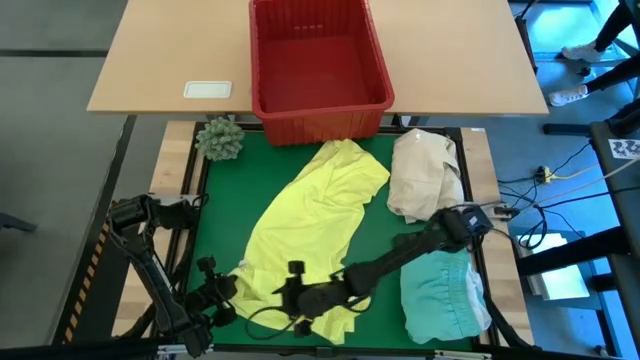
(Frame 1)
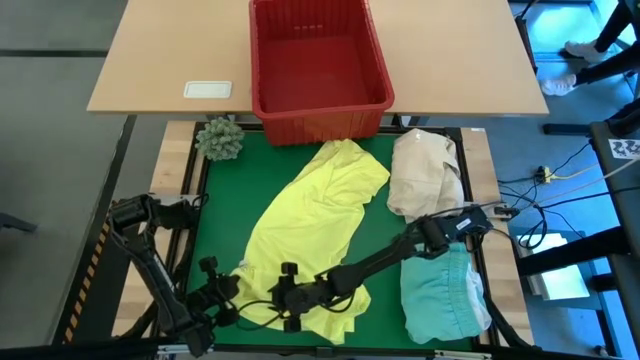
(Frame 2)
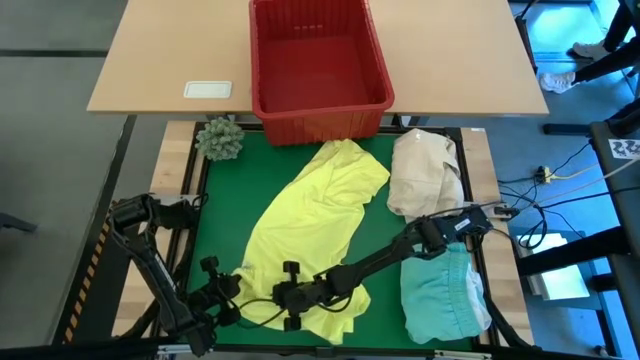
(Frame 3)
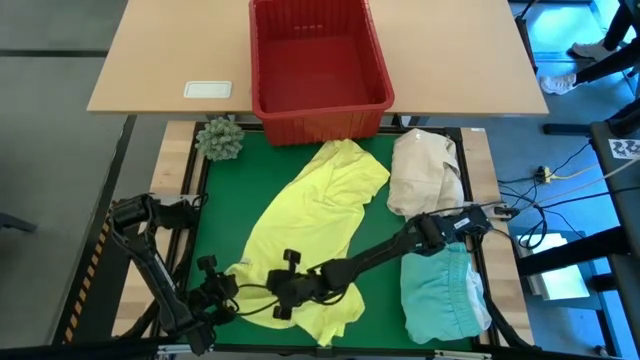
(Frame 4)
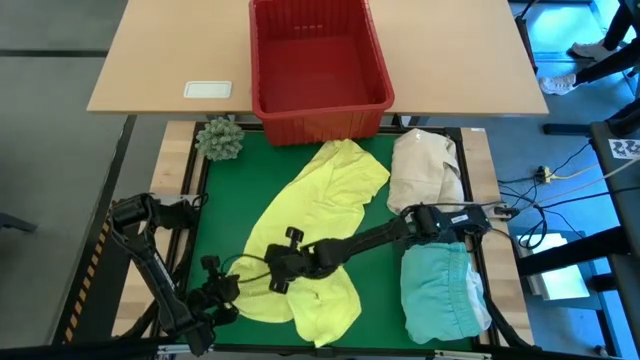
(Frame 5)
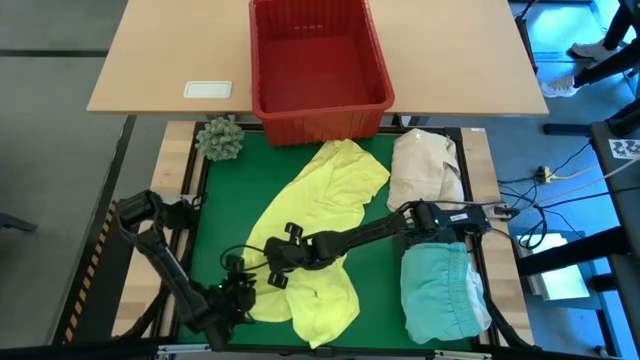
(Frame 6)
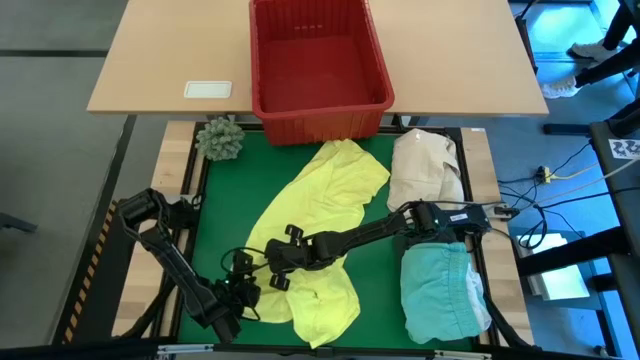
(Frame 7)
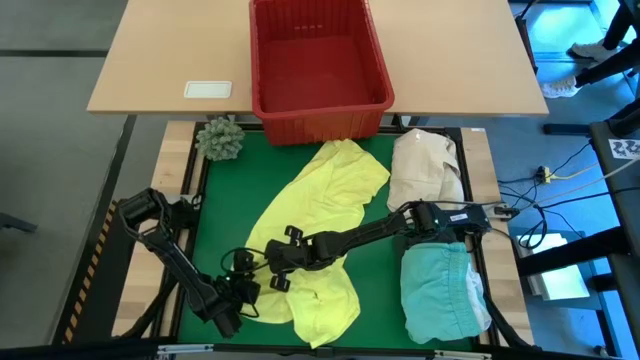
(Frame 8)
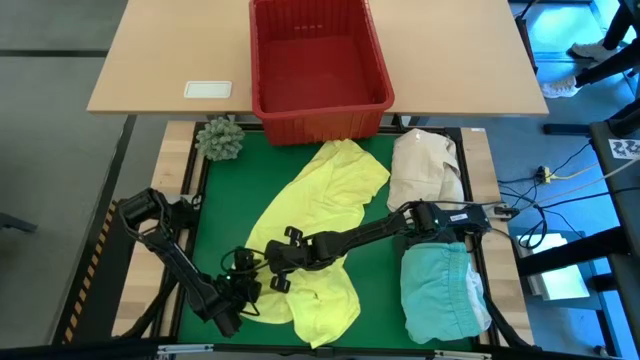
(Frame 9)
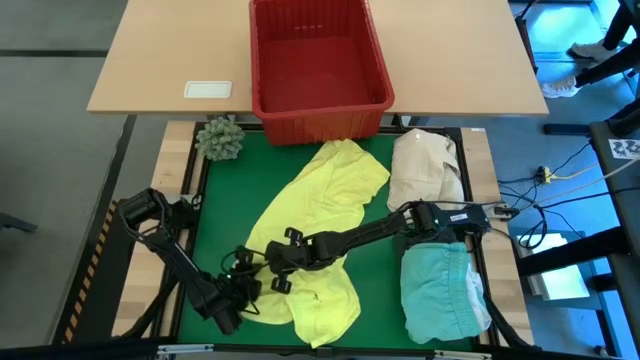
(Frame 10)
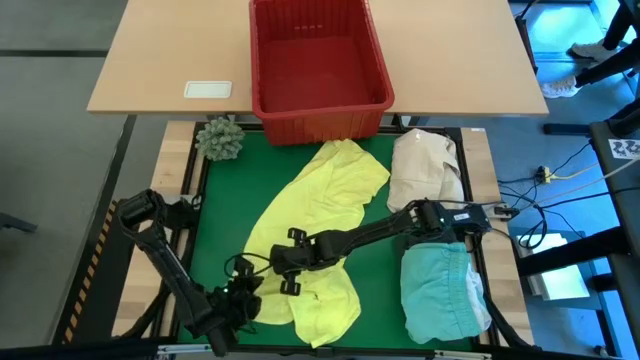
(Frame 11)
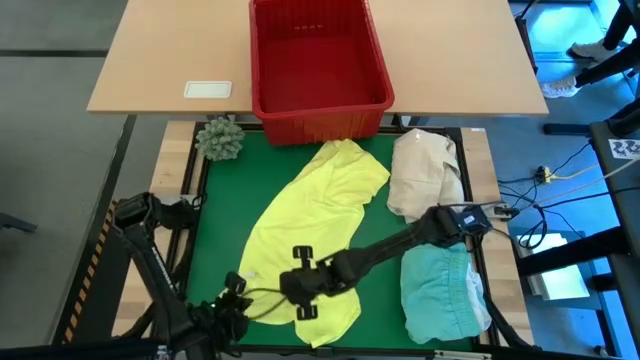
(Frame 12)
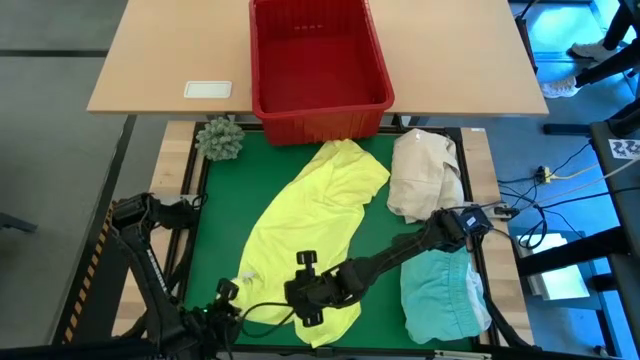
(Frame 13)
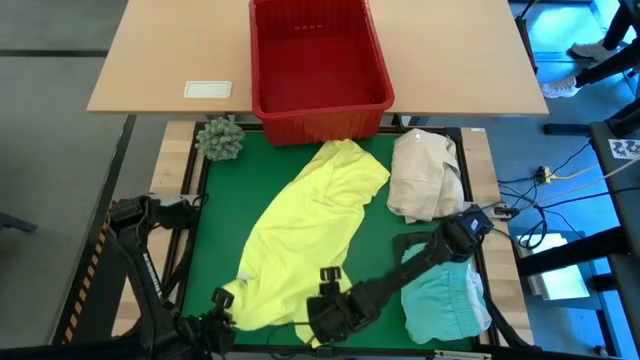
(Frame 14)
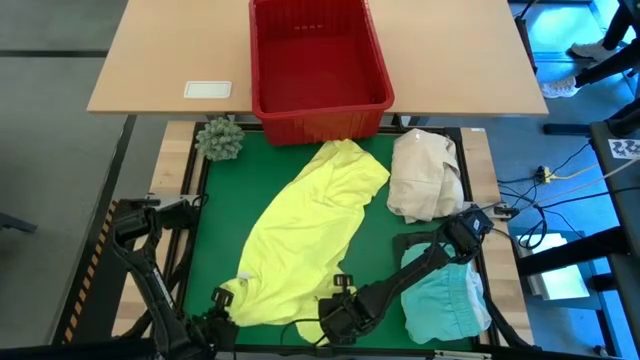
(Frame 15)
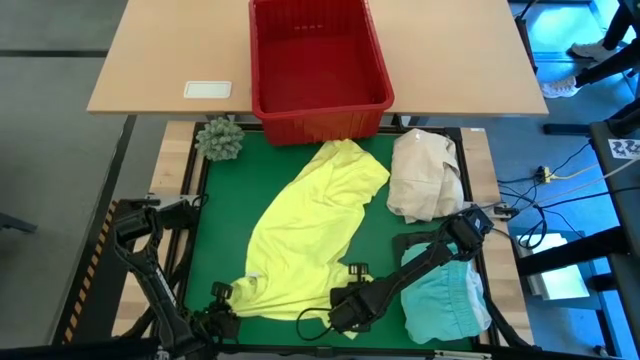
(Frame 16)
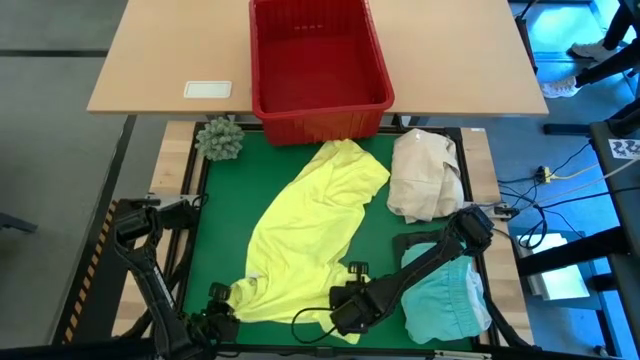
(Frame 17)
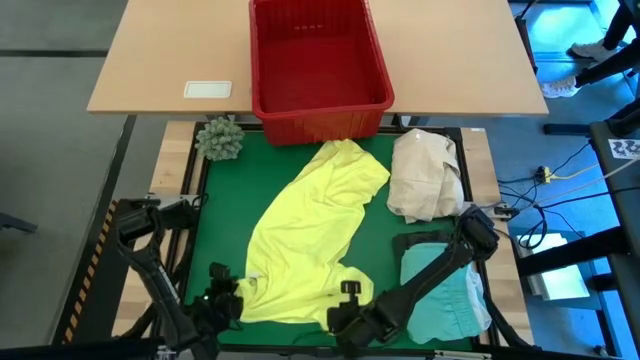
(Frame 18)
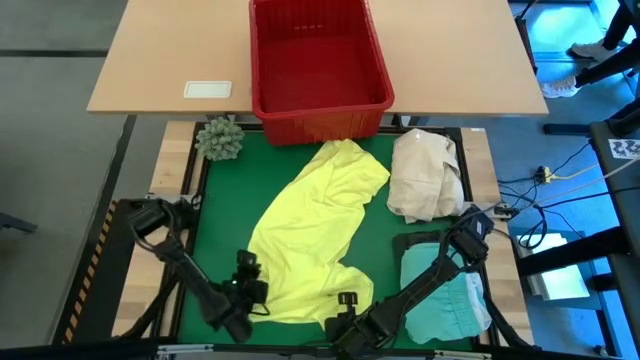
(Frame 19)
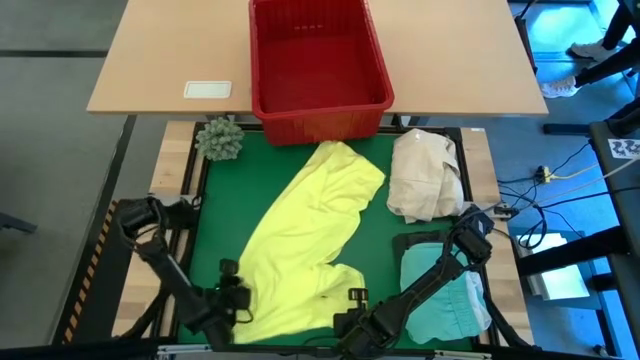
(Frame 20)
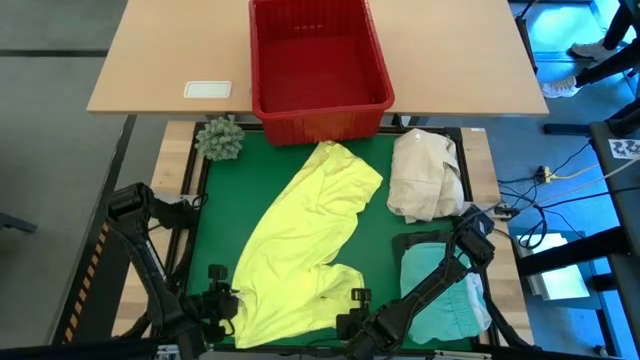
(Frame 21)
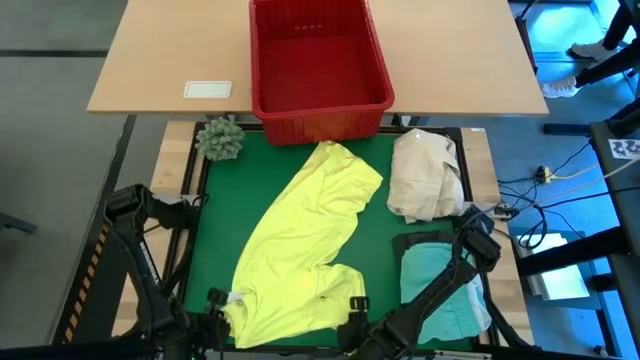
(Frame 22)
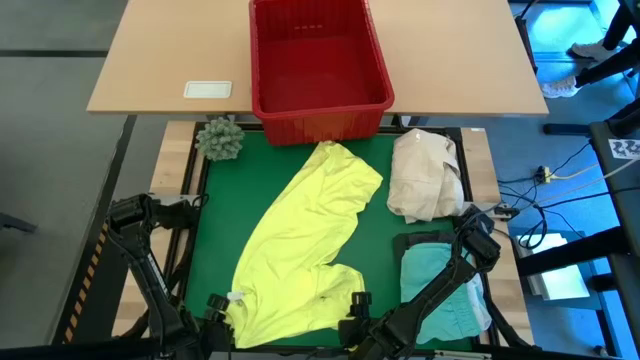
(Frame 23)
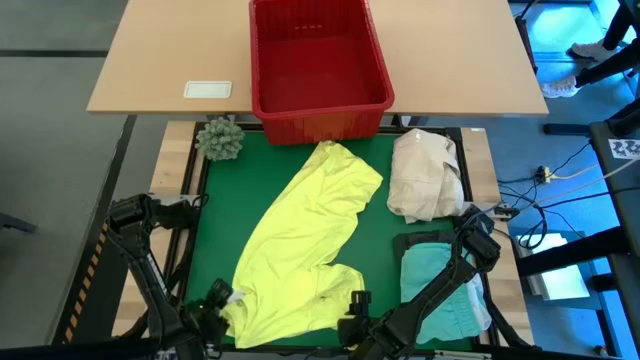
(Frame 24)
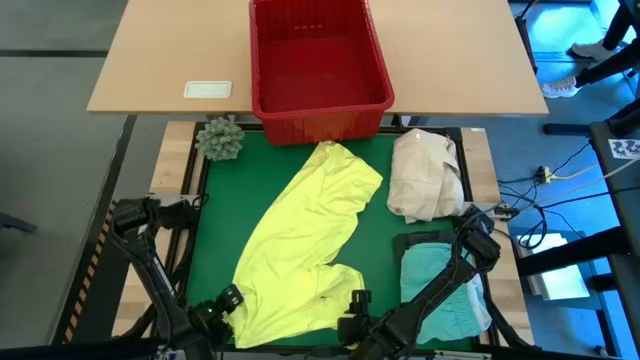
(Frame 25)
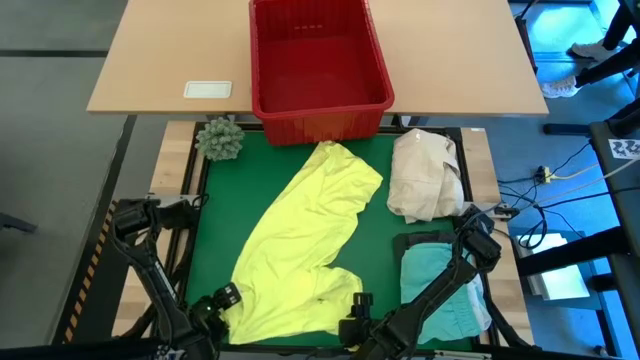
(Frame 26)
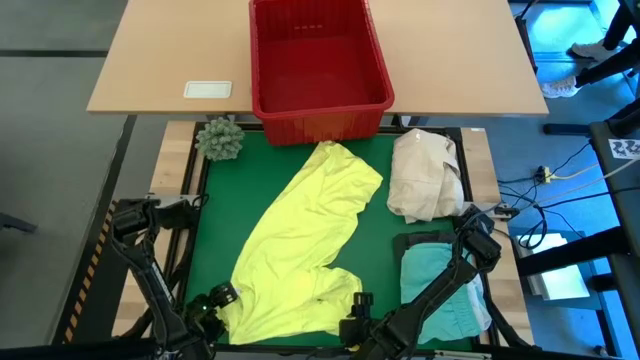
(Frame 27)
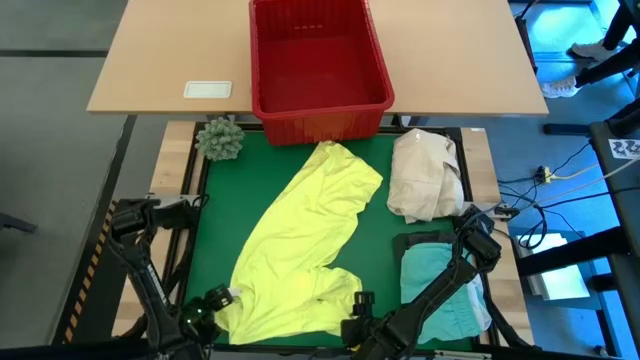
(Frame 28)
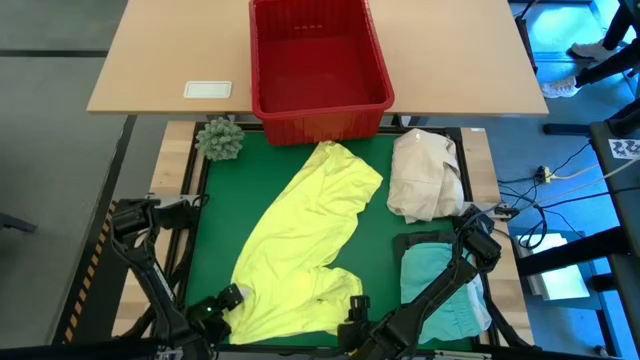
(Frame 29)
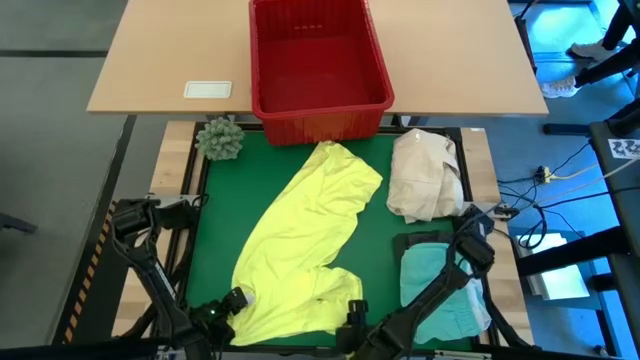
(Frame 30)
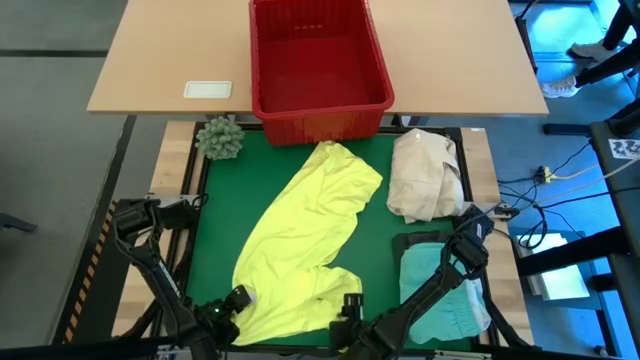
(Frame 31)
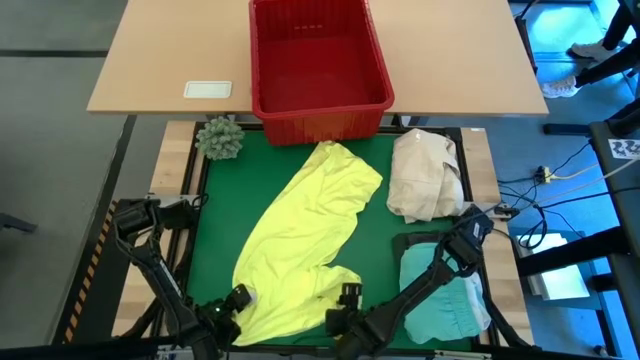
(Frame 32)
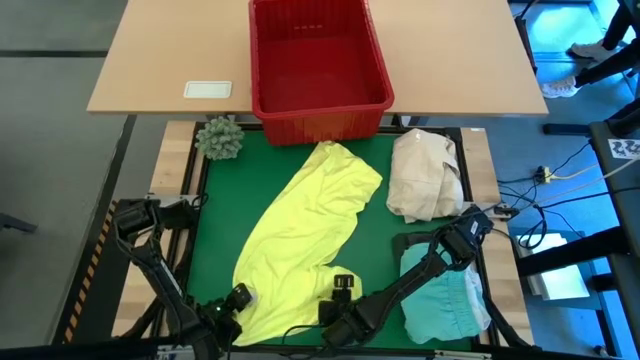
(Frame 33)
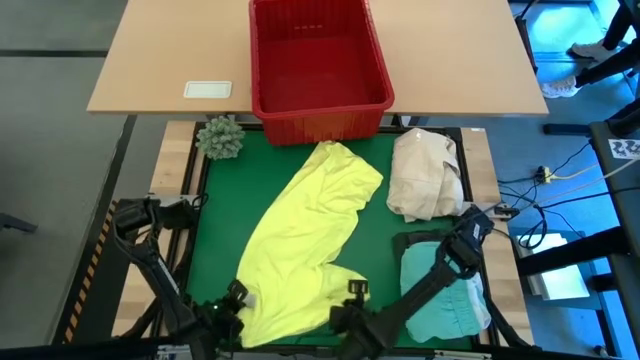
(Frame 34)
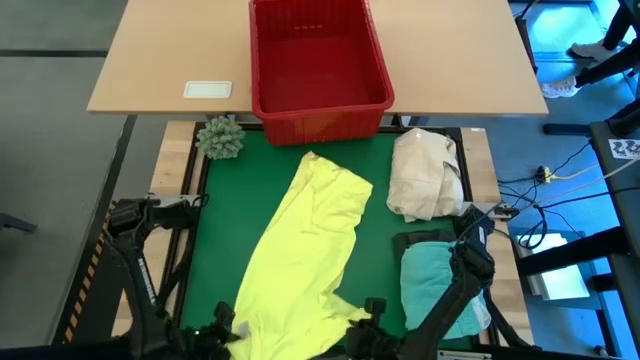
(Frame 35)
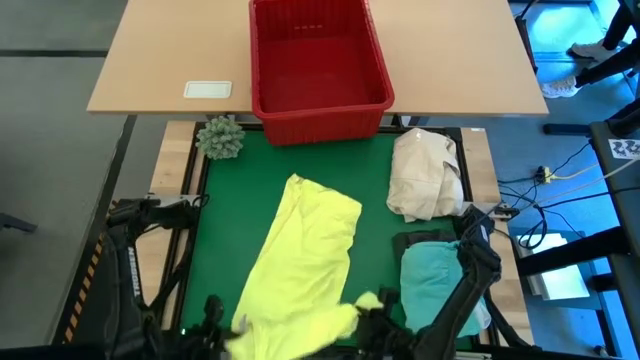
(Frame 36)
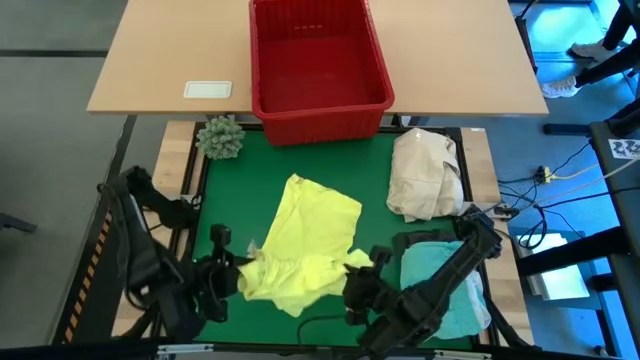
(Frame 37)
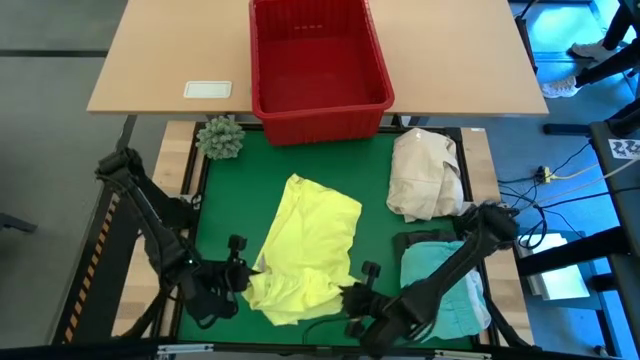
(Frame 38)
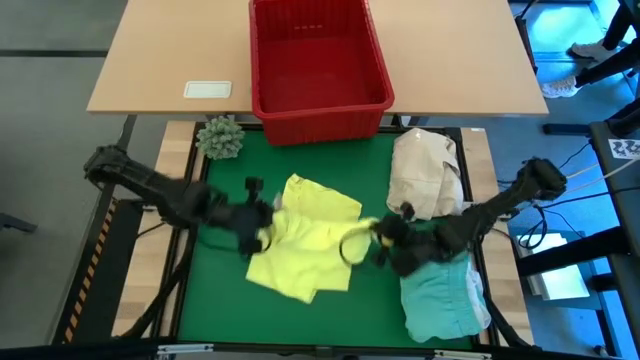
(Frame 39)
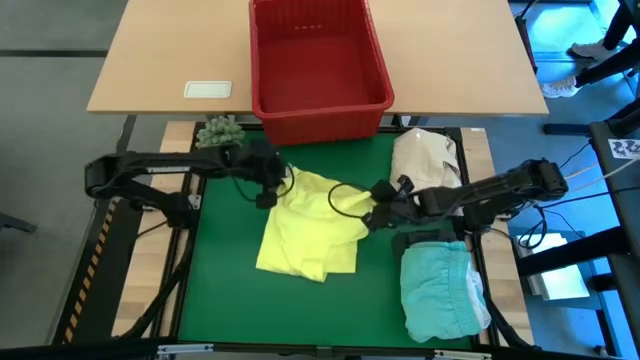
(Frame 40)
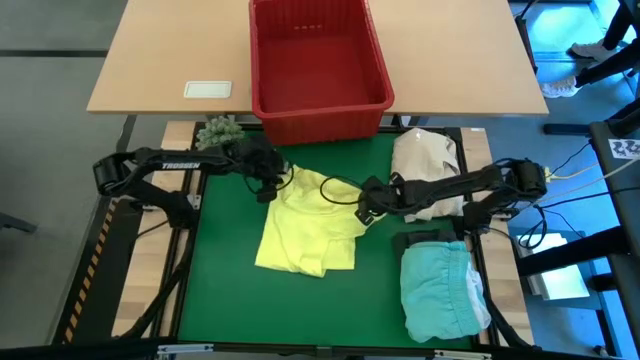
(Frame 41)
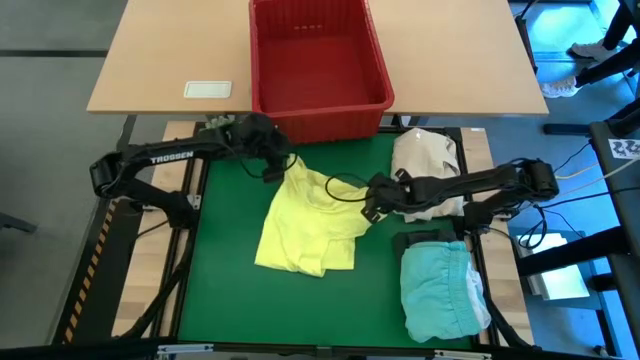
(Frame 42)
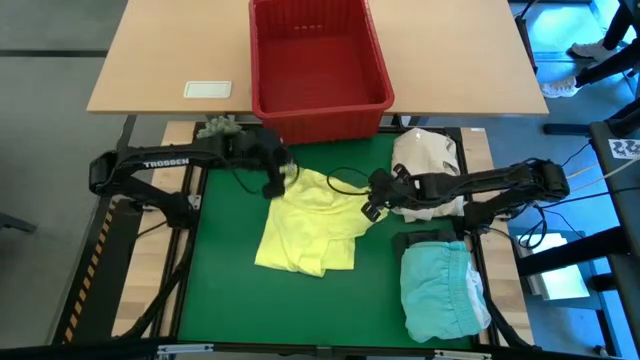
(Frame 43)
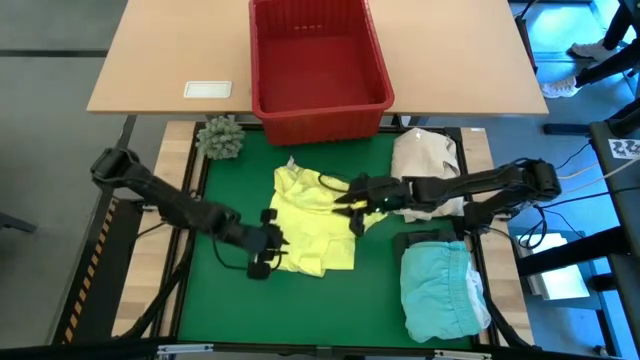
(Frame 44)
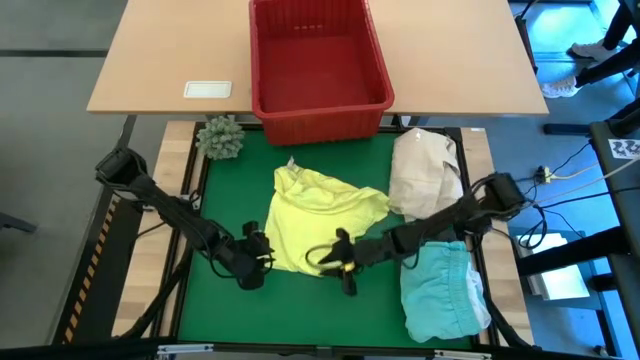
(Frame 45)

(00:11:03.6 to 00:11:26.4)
Task: Fold Laundry from Bin
Fold the yellow shirt
